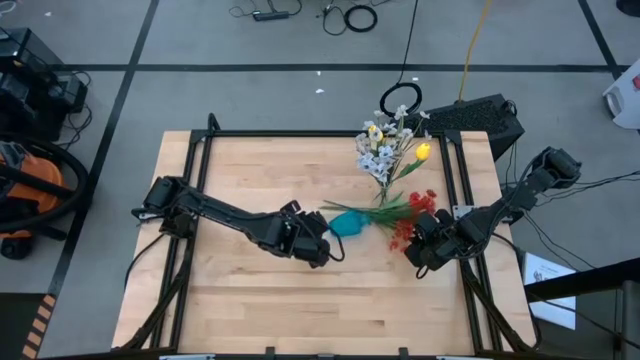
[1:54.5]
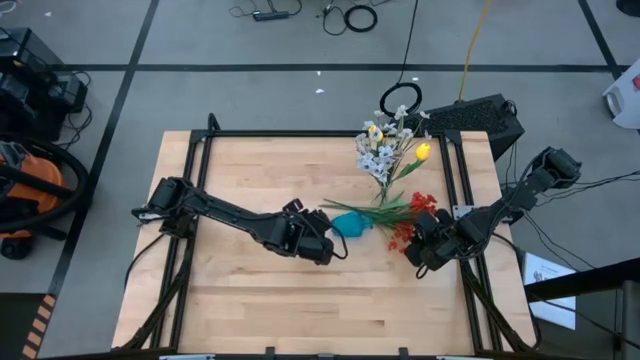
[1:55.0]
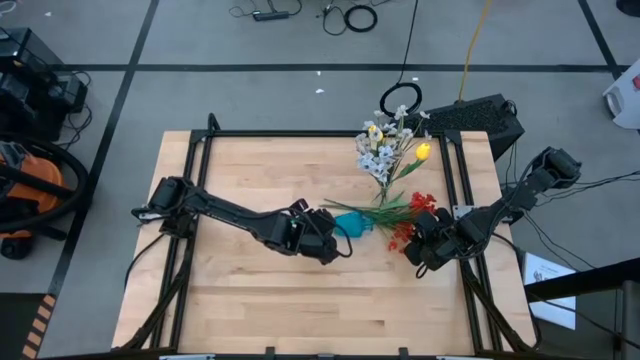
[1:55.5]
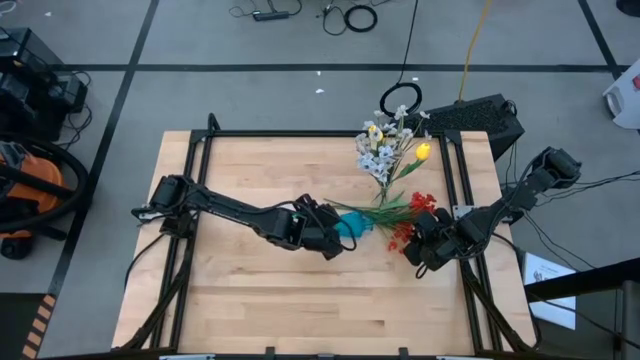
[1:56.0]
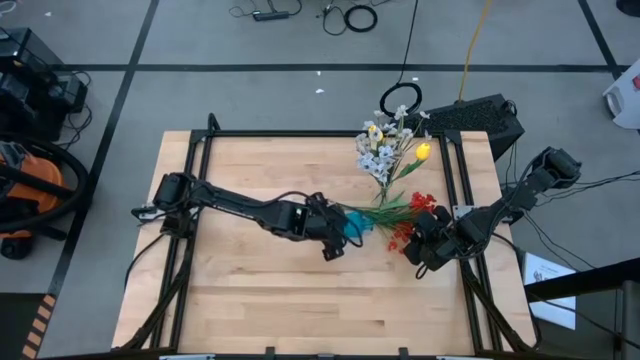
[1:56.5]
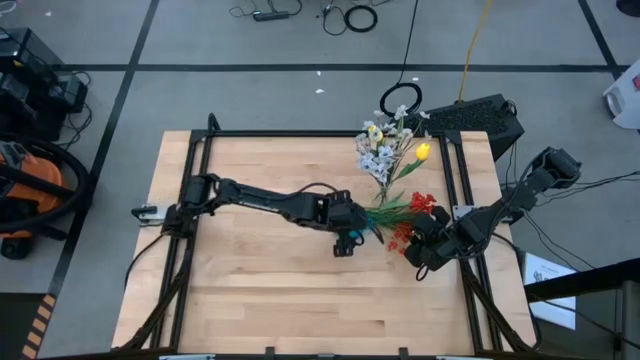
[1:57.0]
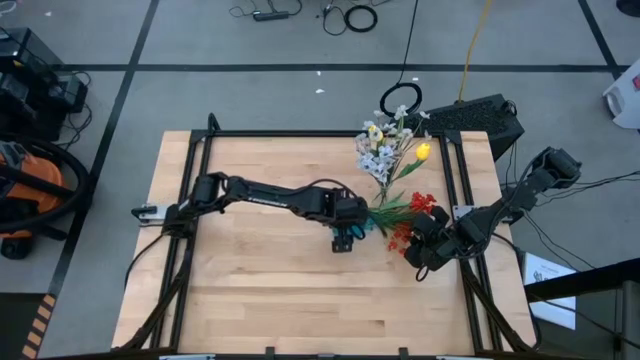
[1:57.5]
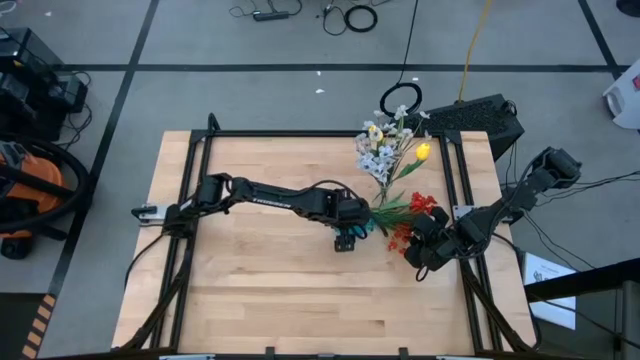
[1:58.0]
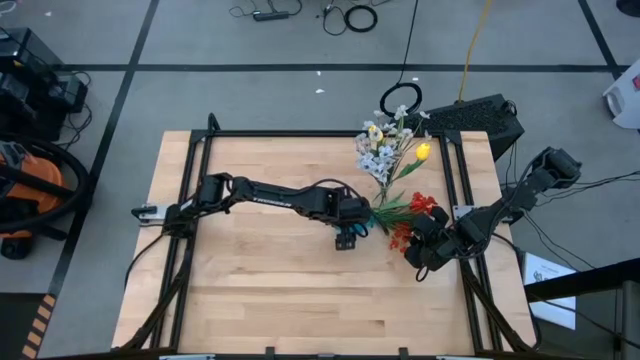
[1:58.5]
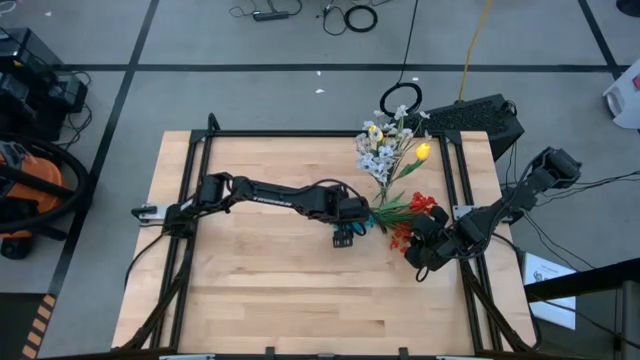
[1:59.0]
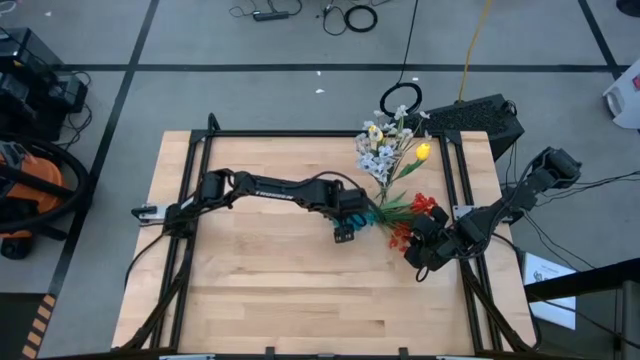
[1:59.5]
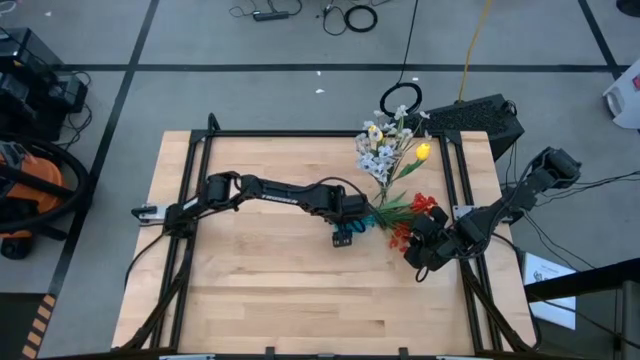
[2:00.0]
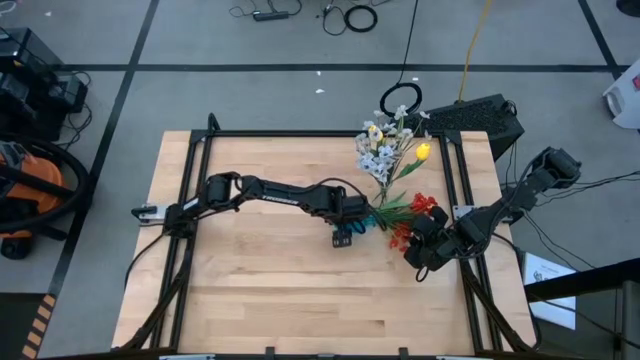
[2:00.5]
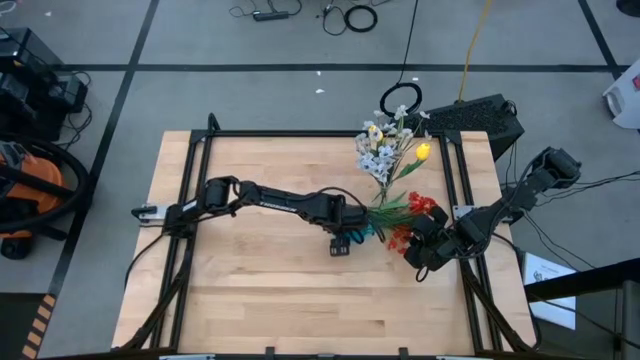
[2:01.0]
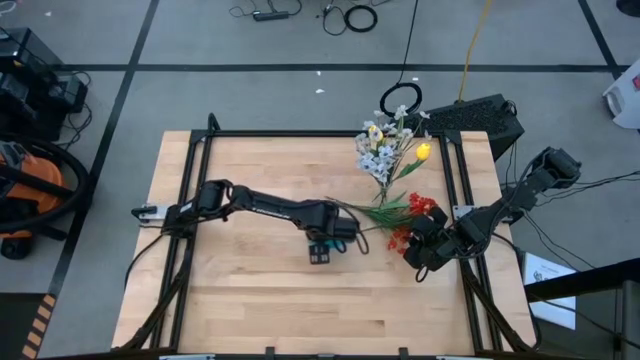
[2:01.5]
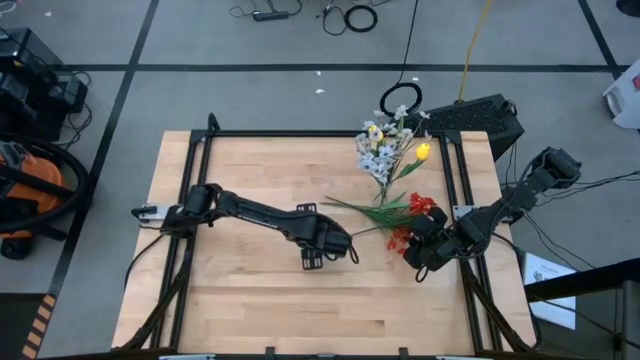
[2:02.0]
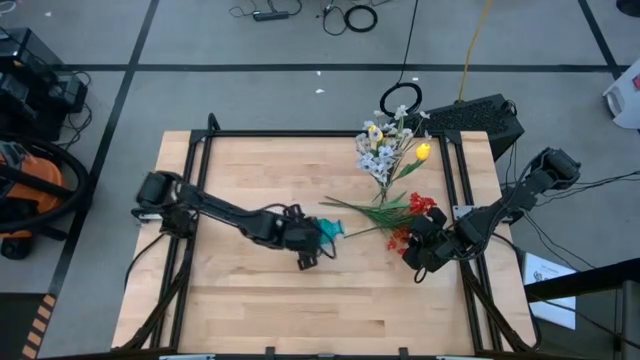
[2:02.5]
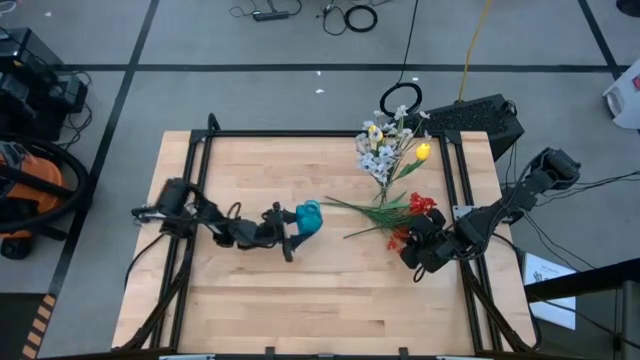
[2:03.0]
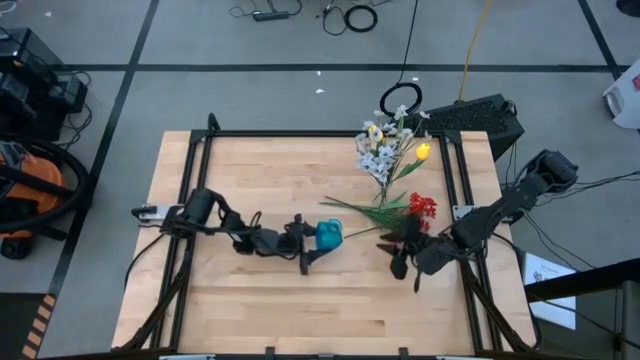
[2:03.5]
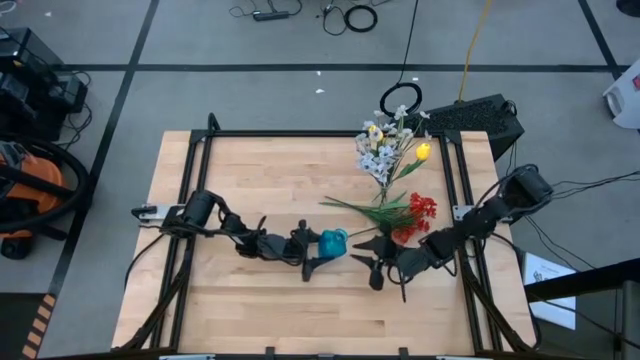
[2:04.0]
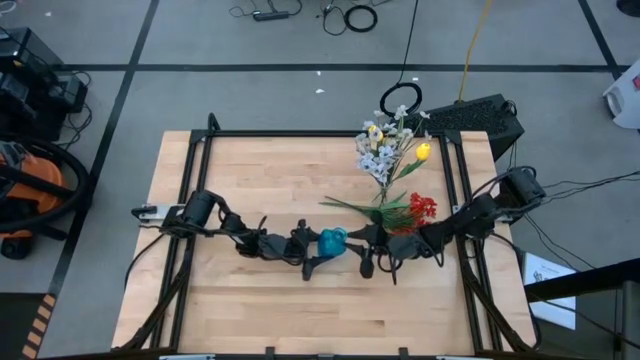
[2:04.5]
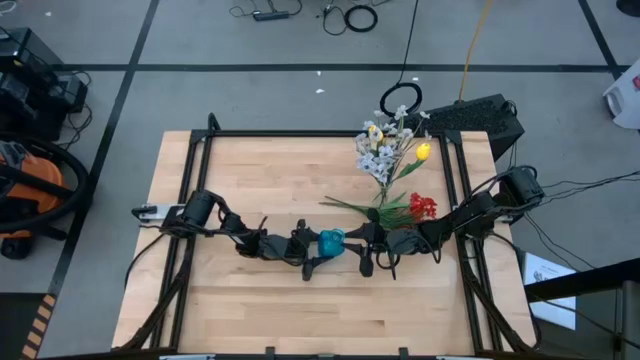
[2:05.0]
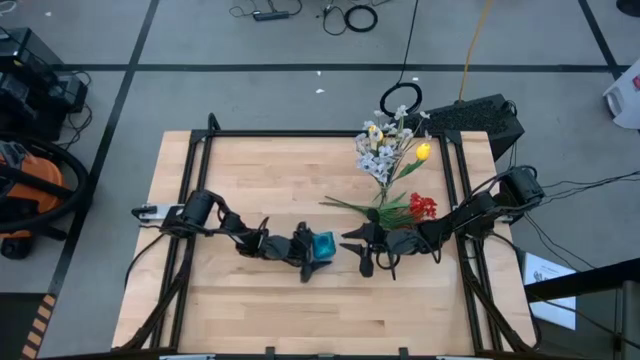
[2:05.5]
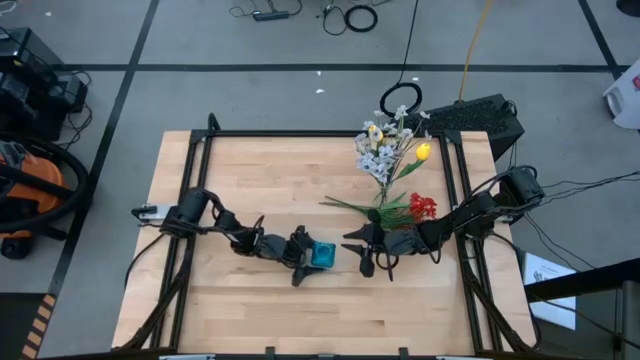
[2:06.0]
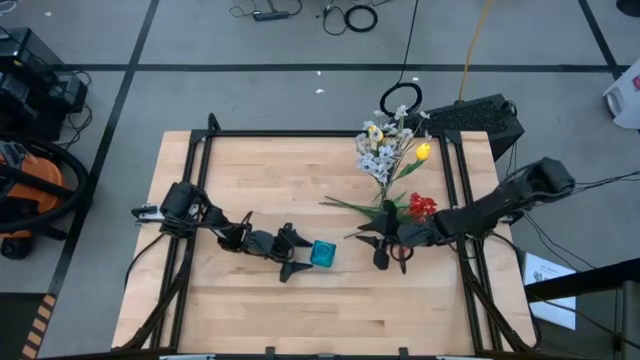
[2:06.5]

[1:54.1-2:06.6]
Task: Sort flowers into vase by color
Adjust the blue vase on the table

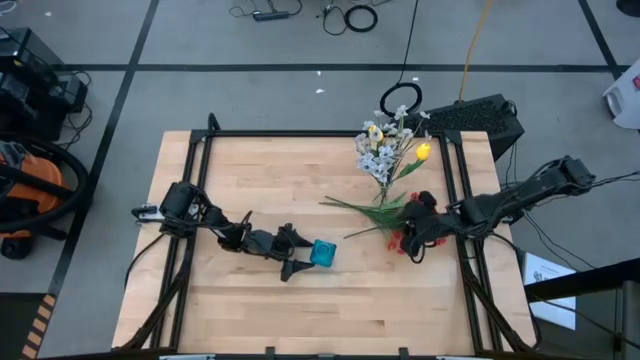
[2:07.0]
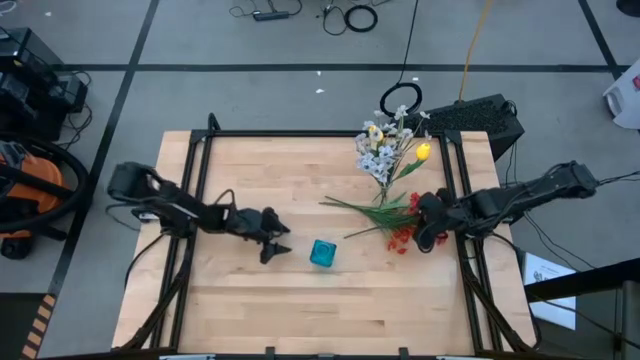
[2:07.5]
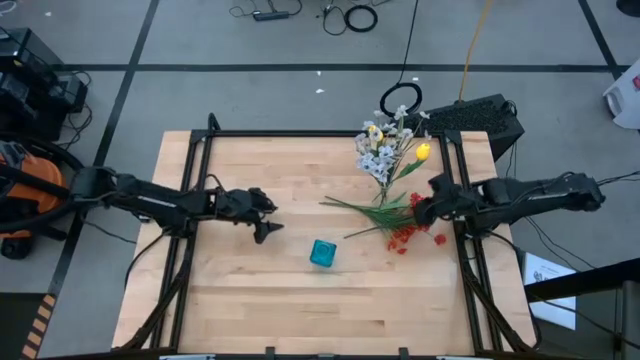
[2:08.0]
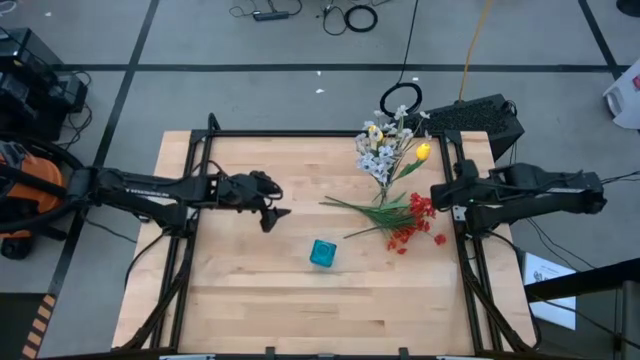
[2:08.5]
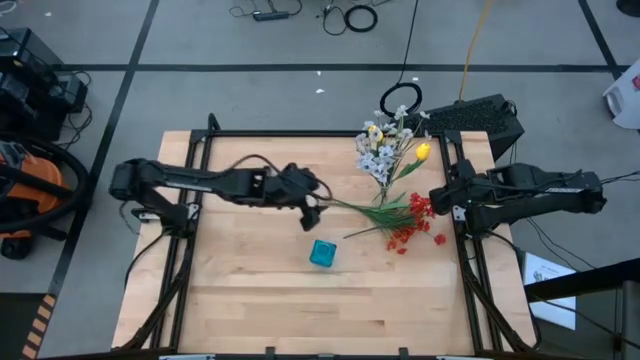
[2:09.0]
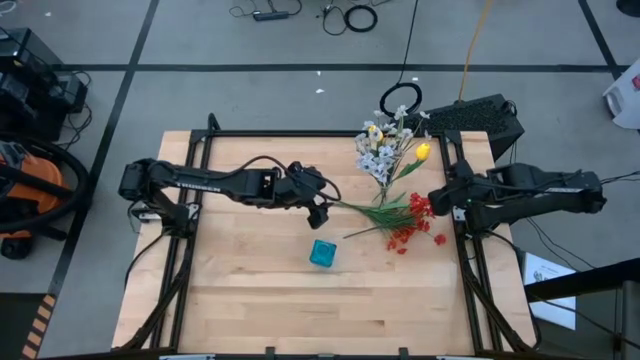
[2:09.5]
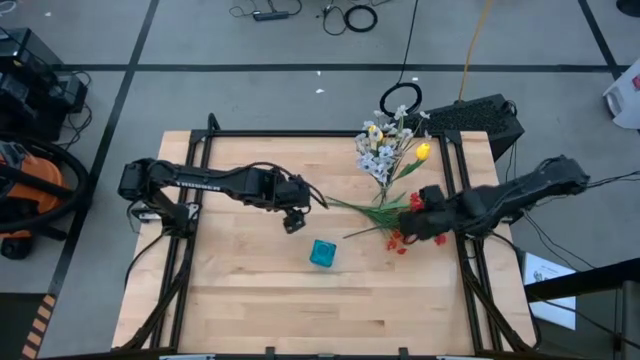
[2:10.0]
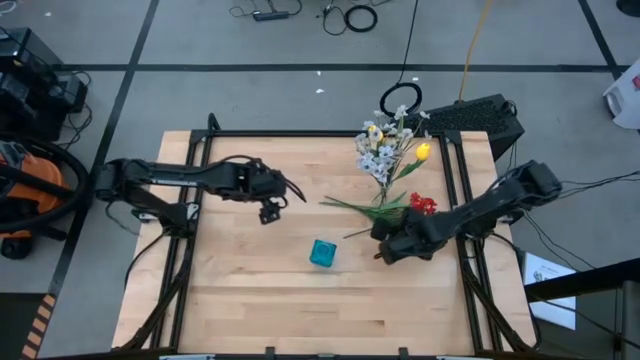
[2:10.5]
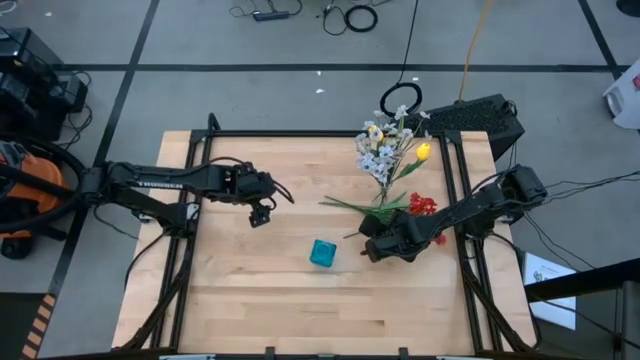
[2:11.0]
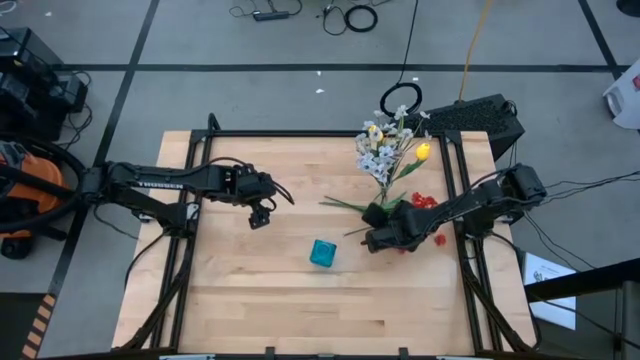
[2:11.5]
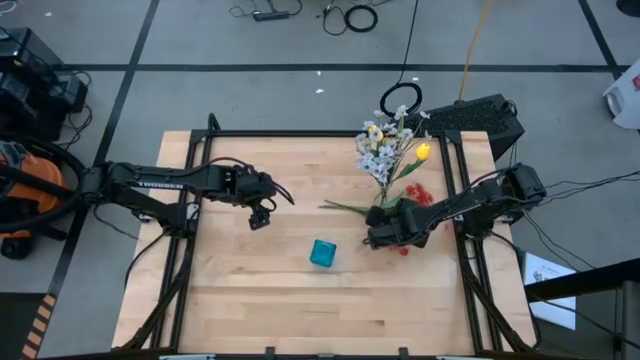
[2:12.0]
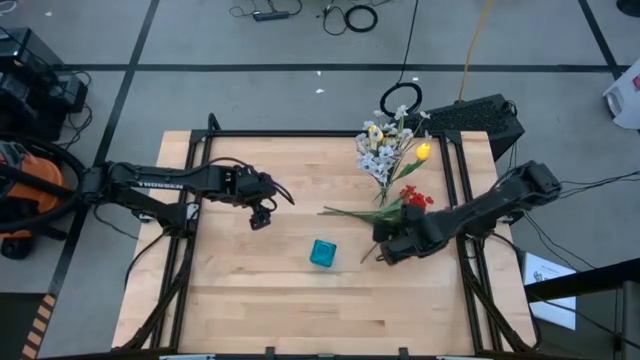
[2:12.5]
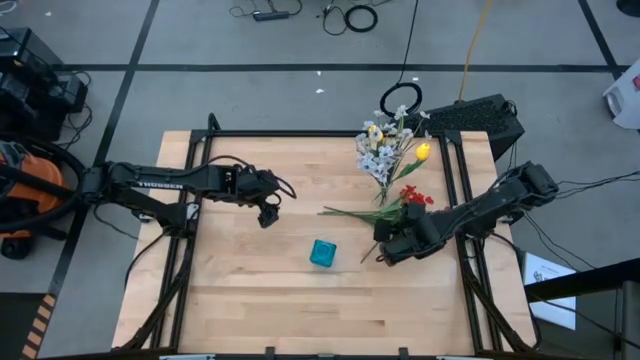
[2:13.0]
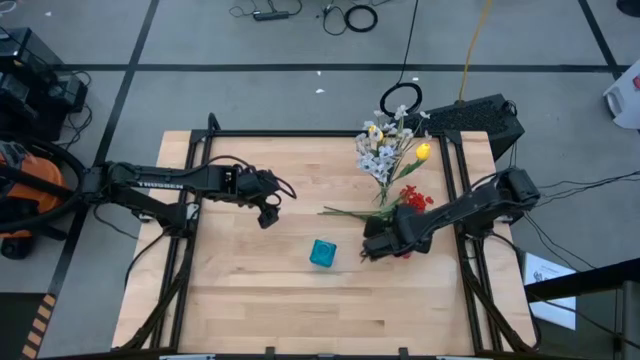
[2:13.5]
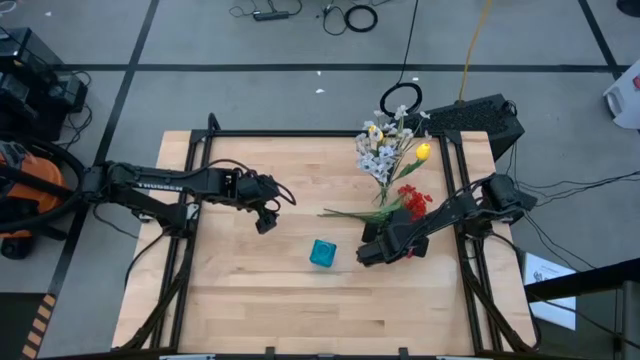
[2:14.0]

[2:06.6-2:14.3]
Put the bottom orange flowers into the blue vase

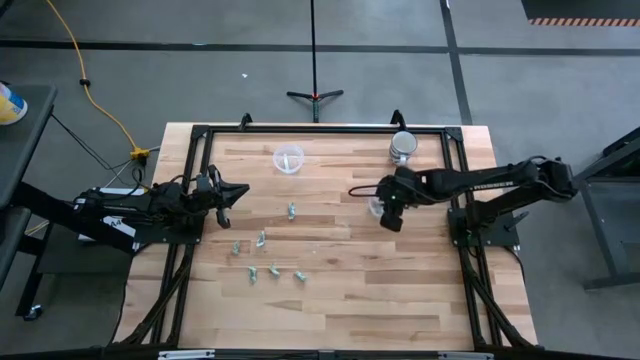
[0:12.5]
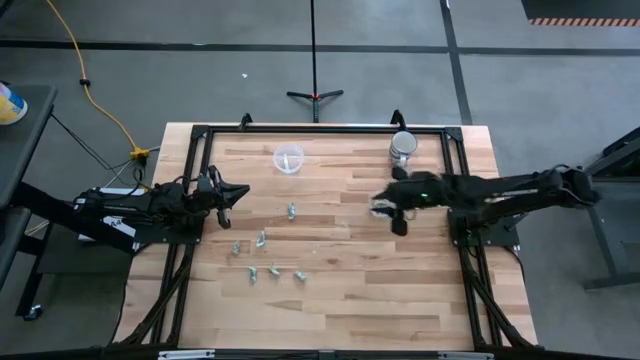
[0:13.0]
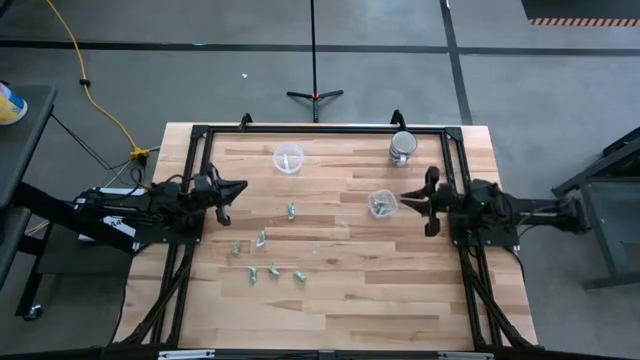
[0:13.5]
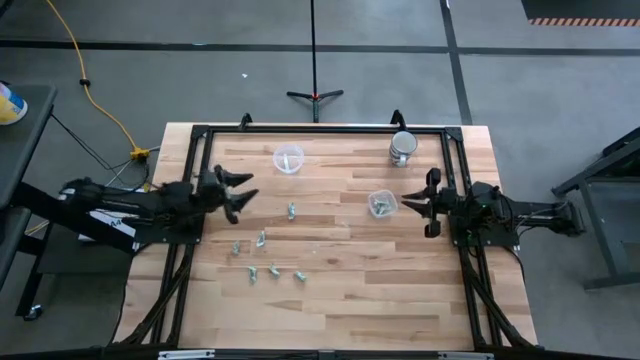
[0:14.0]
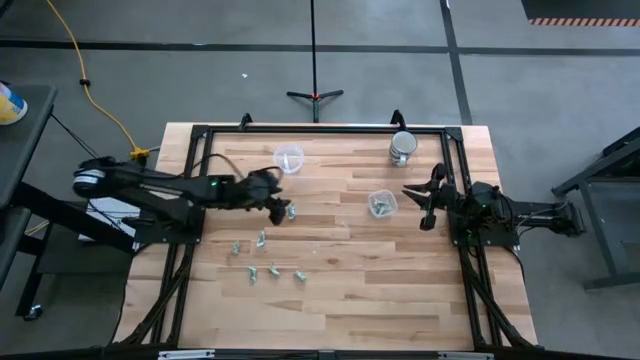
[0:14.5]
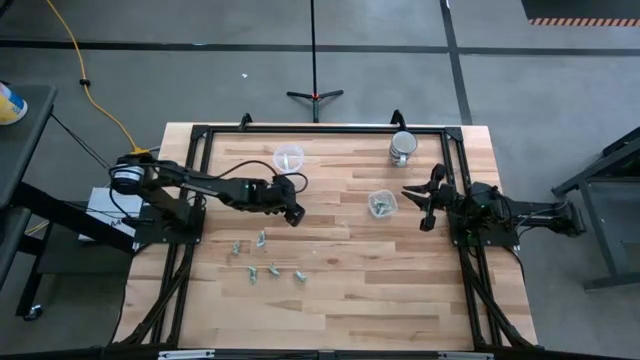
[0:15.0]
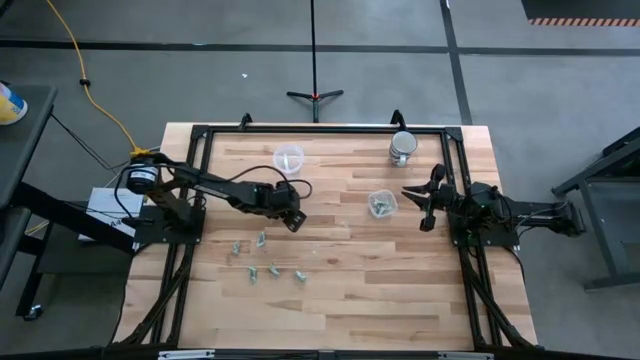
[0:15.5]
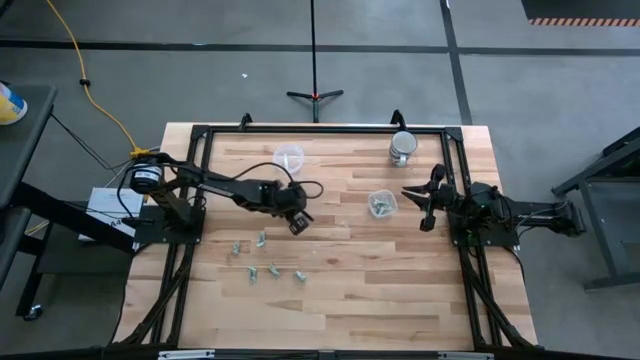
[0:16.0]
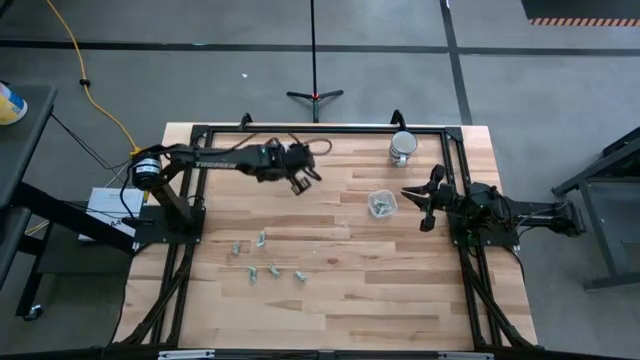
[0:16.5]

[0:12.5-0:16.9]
Task: Pick and place Stevia / Truvia into bins
Put the stevia packet into the round transparent container
